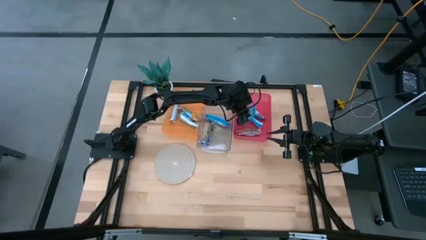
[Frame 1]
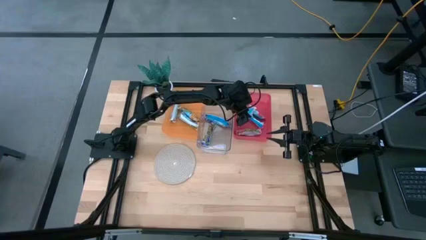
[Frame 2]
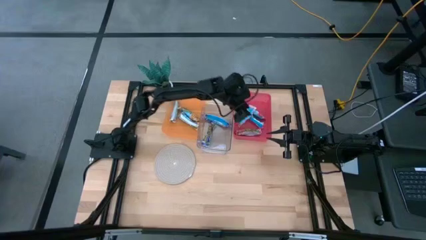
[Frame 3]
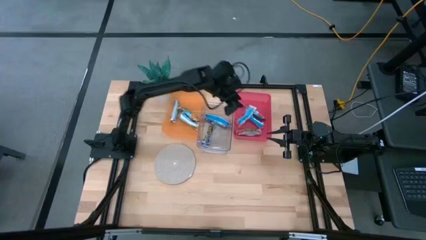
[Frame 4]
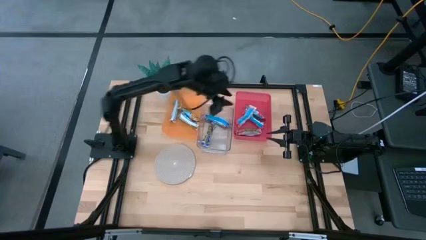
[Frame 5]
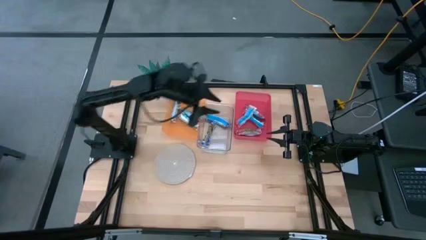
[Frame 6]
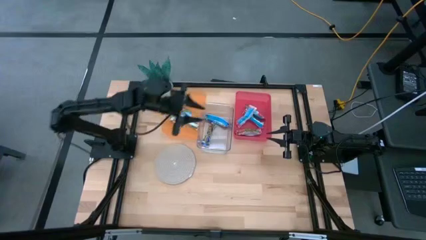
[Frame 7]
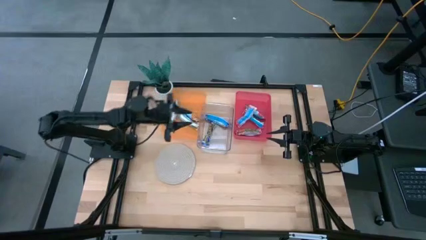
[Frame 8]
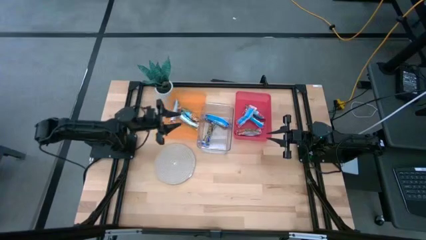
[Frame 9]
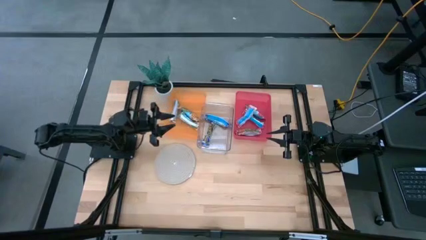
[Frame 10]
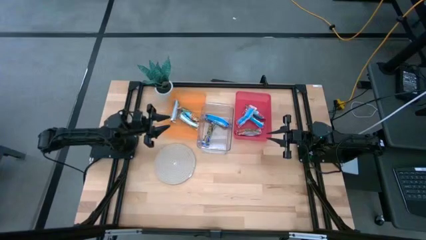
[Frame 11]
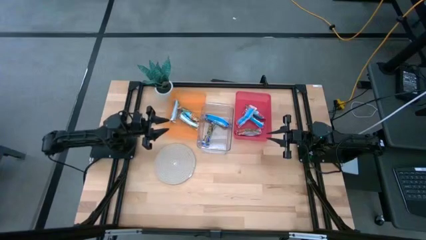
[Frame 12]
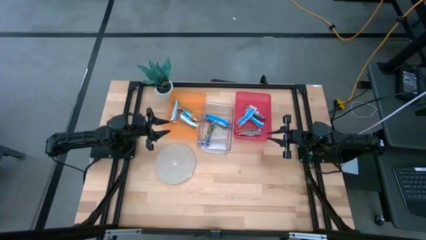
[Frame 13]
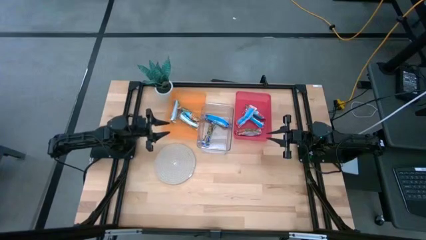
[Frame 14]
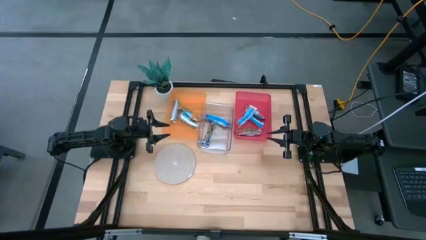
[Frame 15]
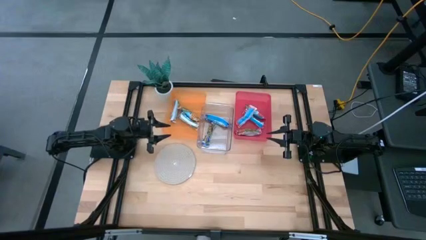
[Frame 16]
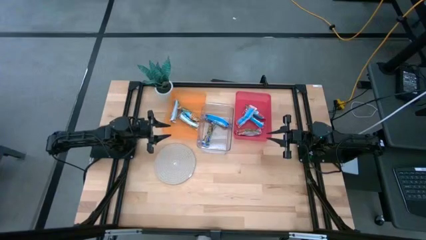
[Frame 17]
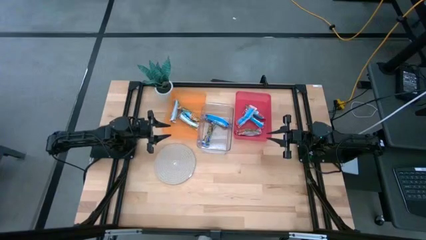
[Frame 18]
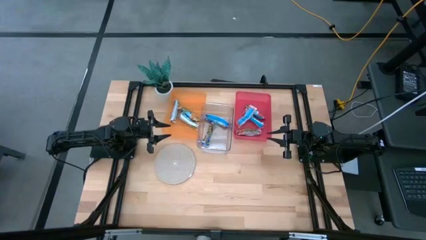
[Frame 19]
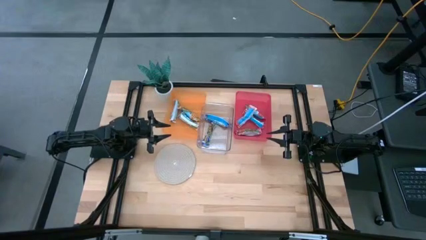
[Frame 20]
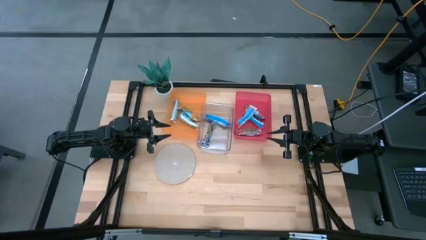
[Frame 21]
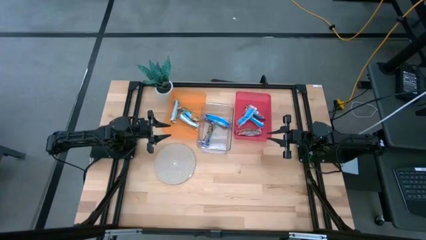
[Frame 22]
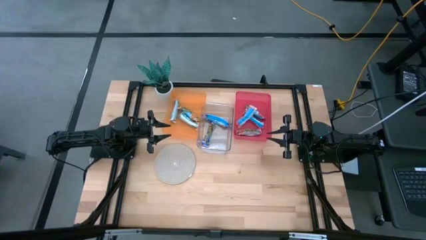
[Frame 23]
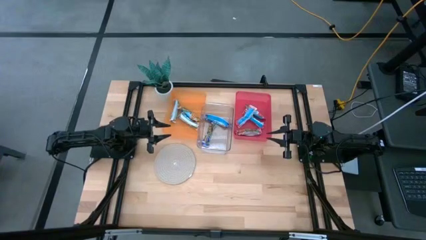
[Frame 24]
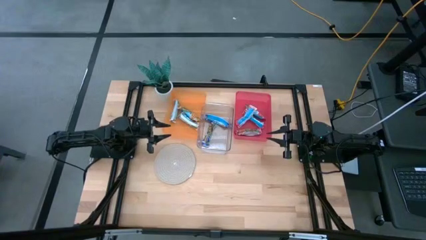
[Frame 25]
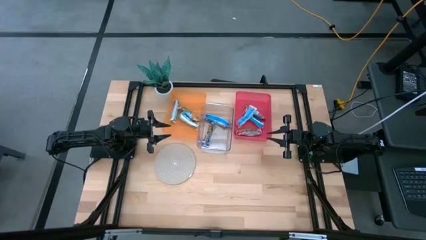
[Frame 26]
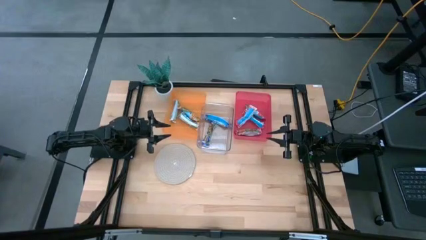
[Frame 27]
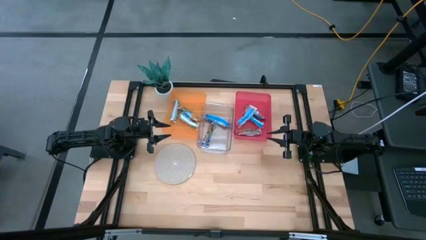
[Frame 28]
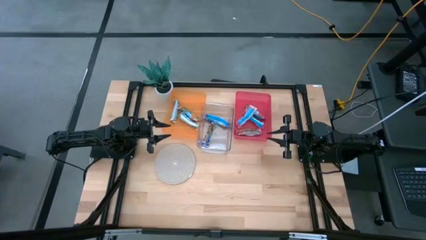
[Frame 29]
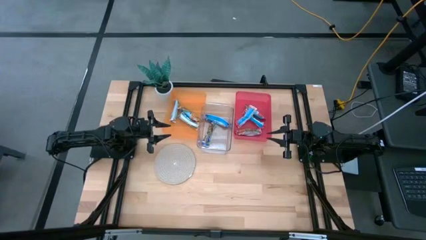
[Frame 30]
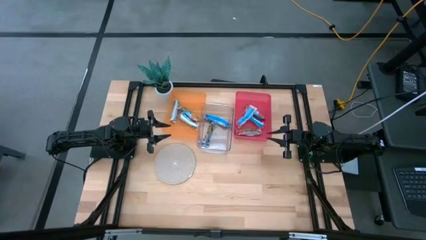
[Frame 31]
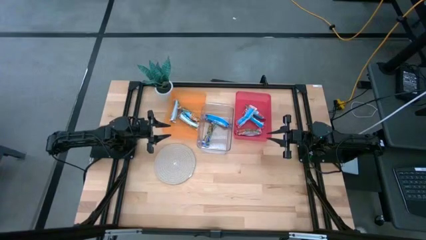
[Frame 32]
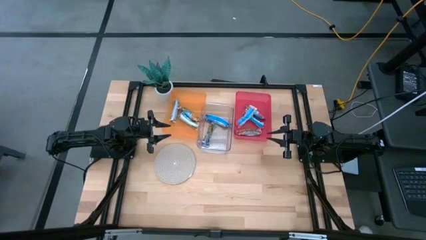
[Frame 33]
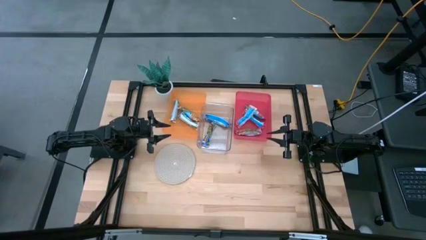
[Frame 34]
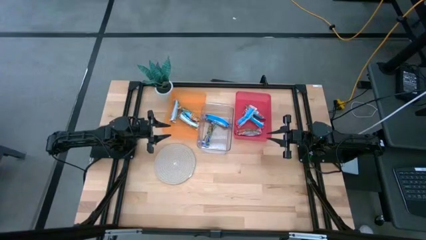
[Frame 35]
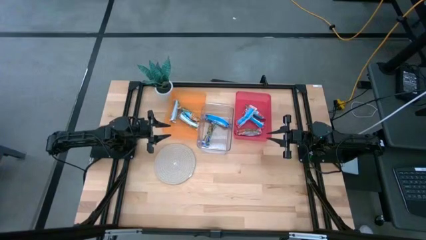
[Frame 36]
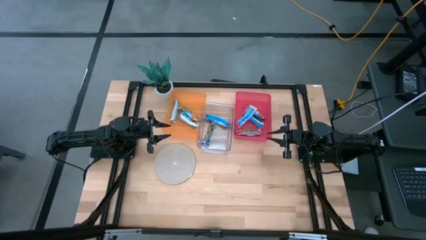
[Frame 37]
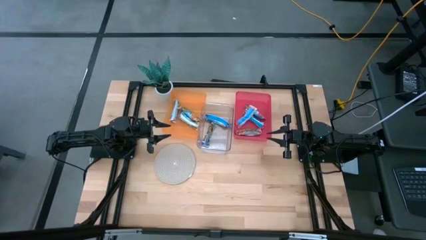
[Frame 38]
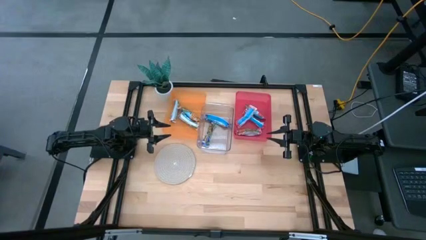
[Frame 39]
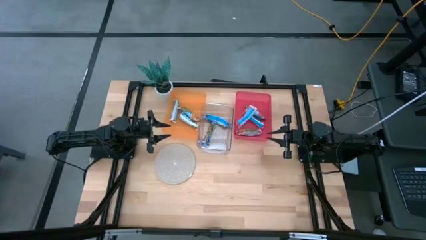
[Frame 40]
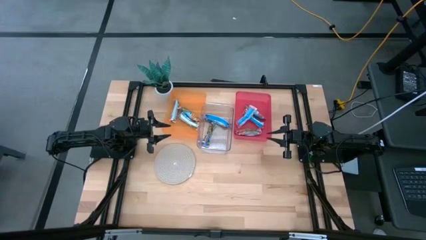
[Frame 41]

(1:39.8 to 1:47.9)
Task: Pick and place Granola Bars by type
Return to Home Position

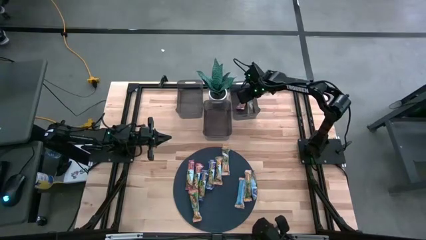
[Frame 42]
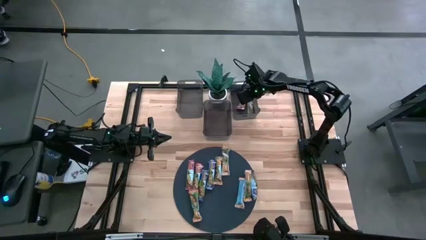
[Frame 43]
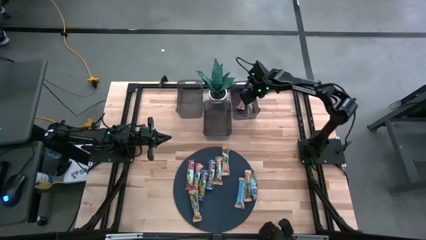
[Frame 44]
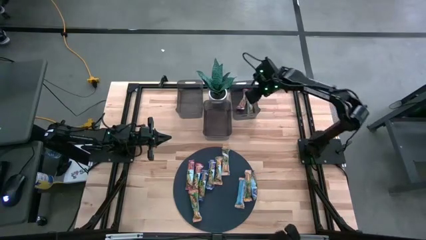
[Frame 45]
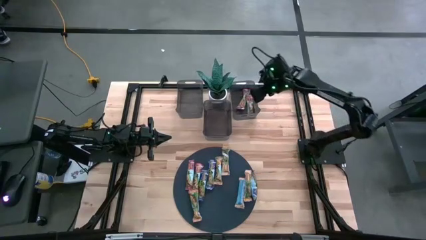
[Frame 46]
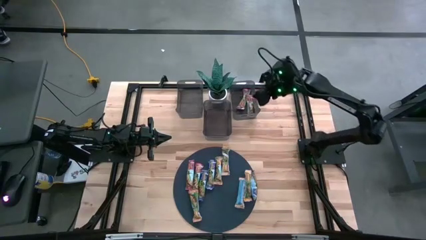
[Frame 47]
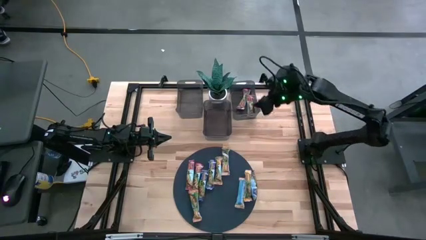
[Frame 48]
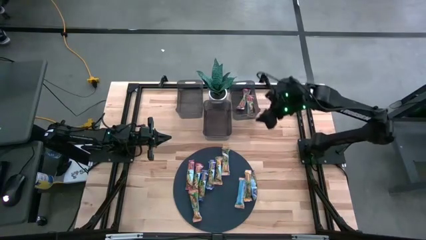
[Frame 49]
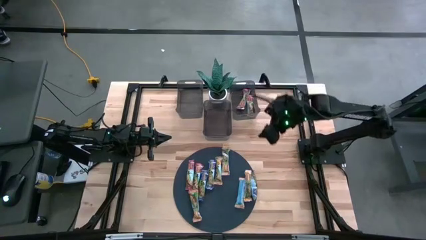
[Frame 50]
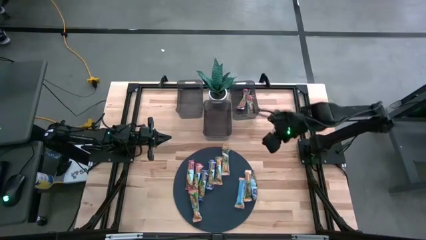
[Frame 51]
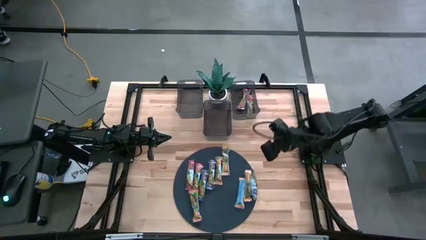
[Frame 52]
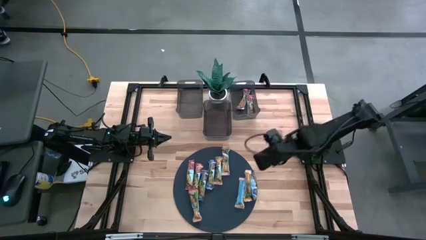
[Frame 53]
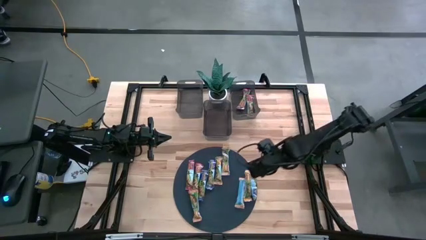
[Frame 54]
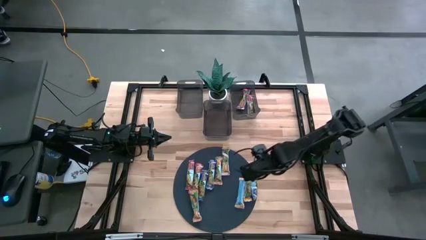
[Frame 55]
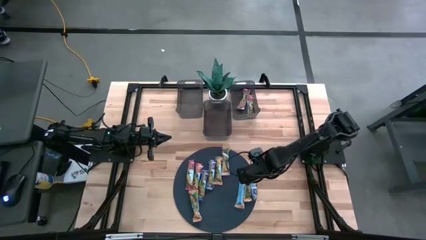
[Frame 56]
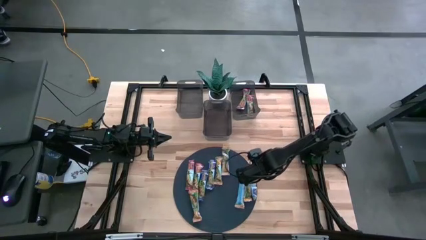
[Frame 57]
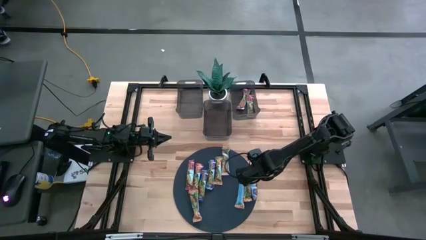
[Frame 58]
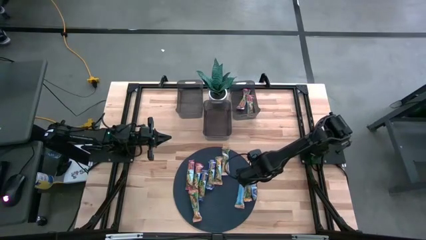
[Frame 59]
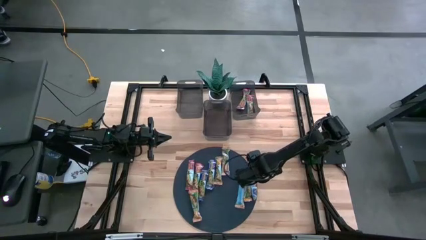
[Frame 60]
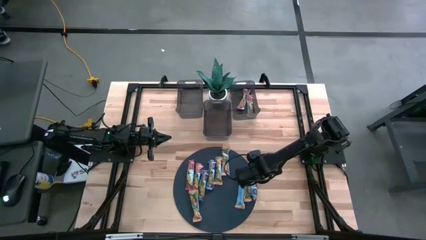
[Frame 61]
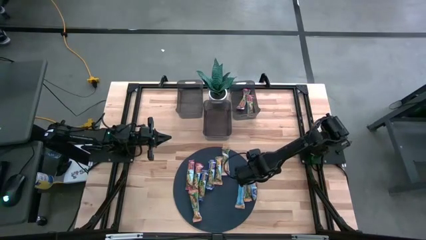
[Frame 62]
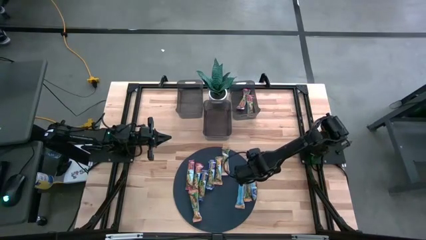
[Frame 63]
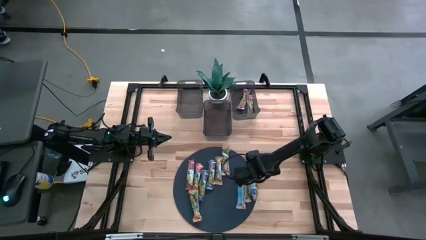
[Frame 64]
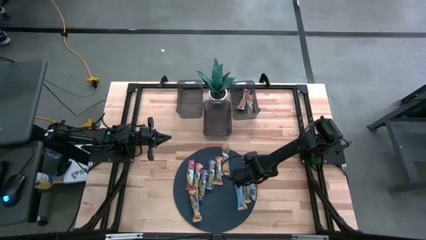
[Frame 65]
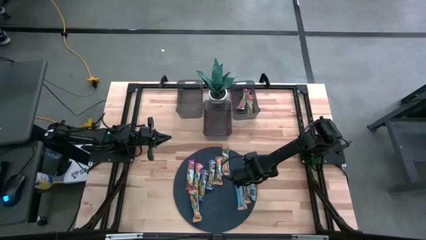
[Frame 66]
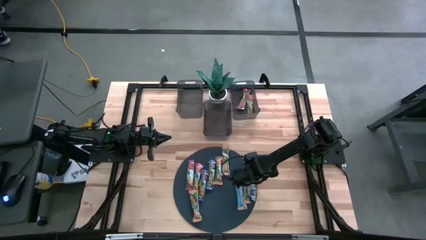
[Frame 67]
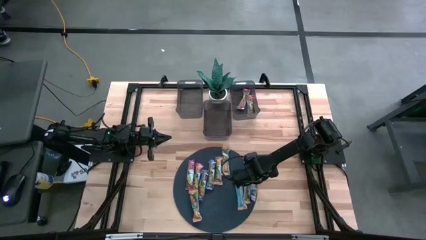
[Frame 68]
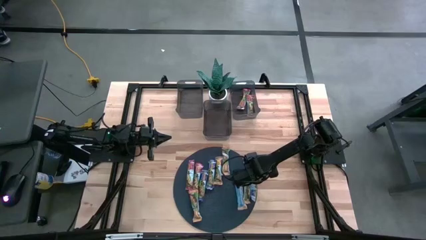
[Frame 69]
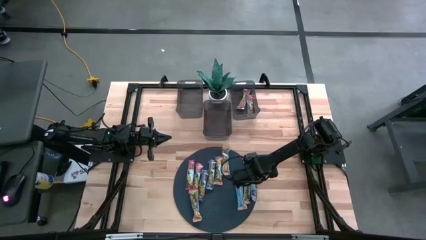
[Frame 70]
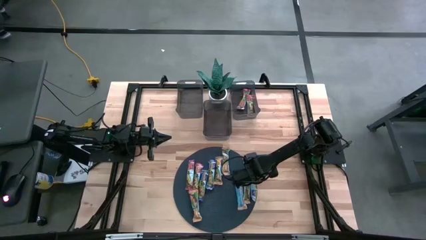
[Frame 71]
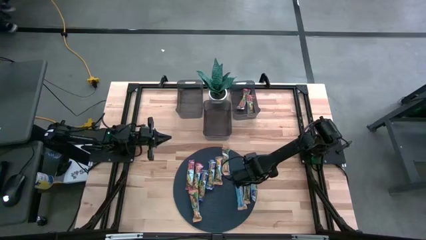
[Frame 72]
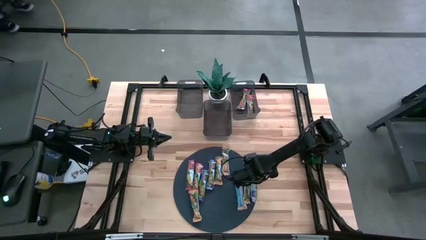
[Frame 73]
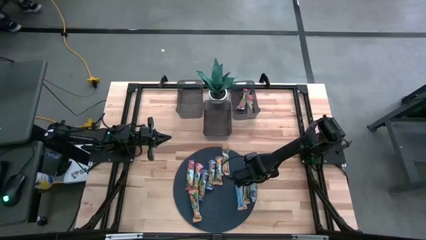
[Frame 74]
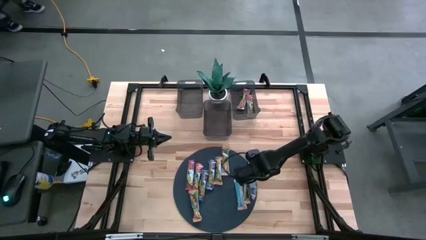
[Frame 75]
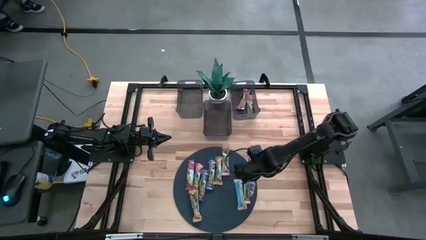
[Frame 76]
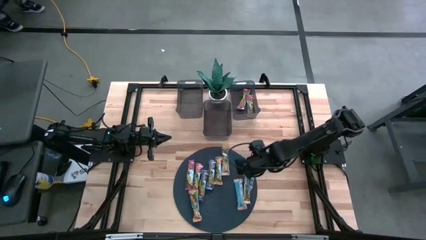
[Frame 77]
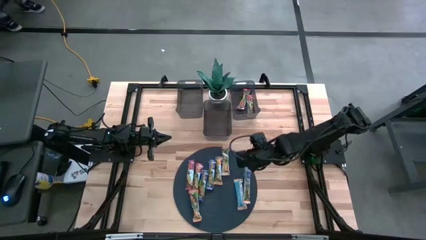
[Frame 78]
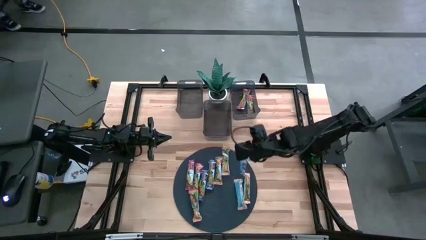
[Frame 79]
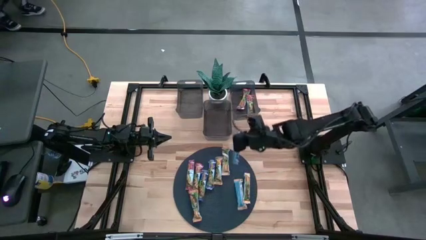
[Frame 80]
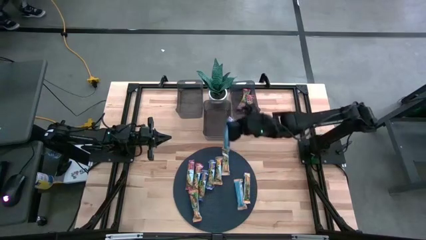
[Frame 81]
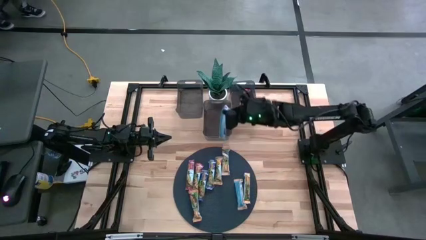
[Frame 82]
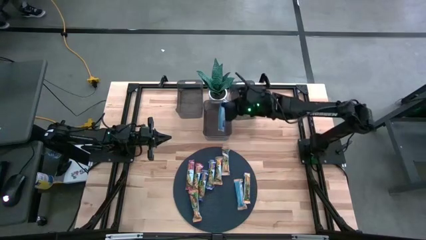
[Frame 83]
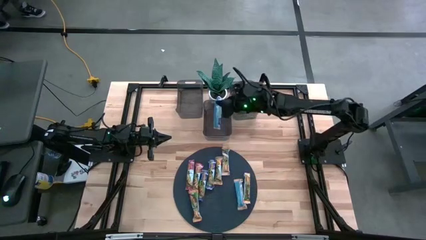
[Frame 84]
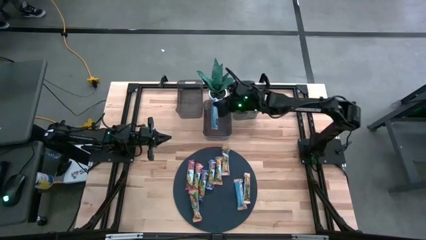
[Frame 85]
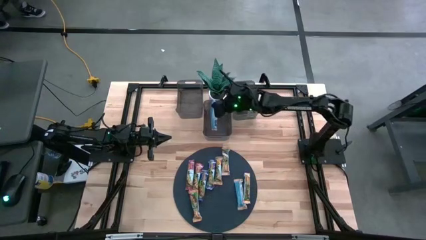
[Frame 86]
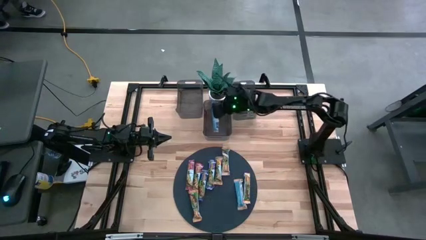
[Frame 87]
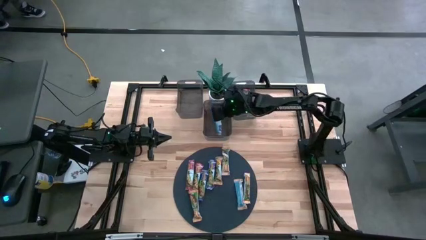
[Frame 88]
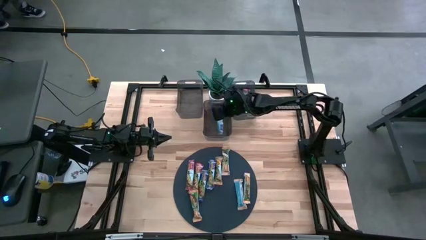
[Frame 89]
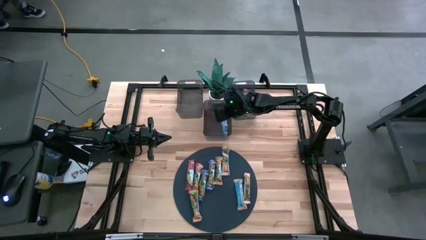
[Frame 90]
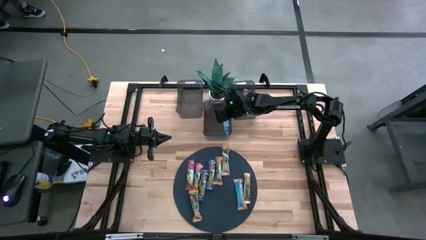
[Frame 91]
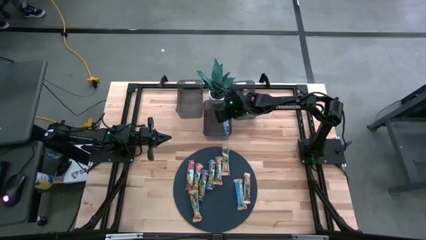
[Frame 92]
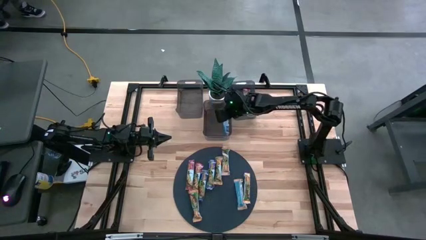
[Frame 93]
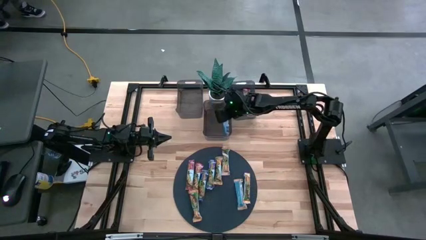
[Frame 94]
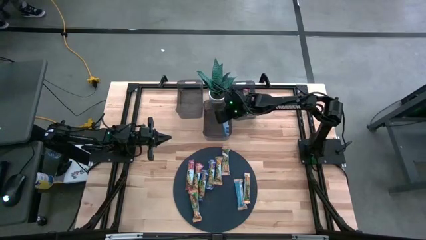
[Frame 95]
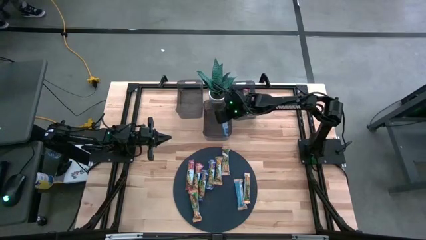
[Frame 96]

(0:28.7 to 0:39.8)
Task: Pick and place Granola Bars by type
Put the blue granola bar into the middle black bin
